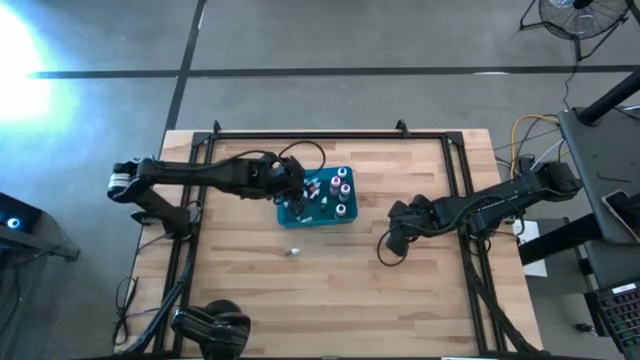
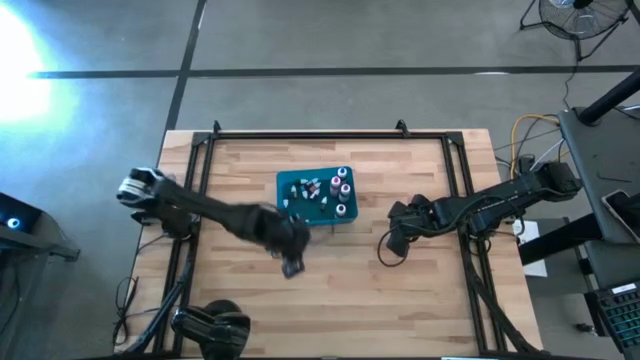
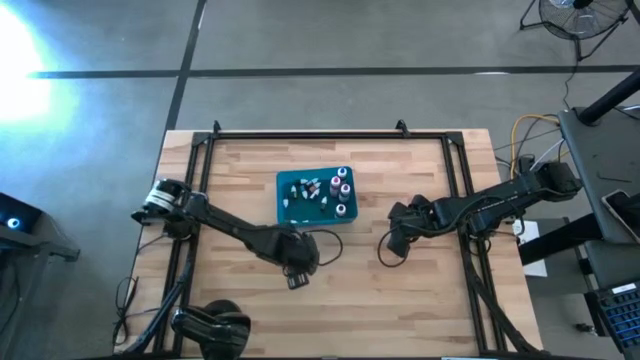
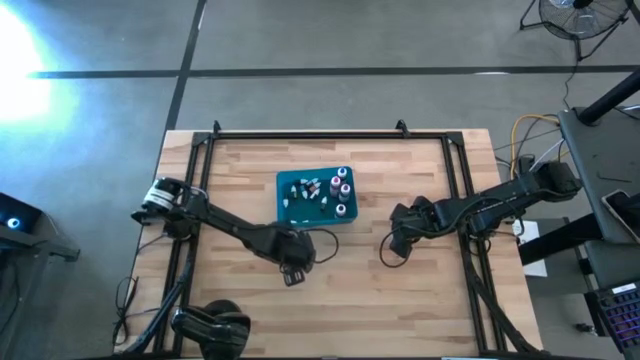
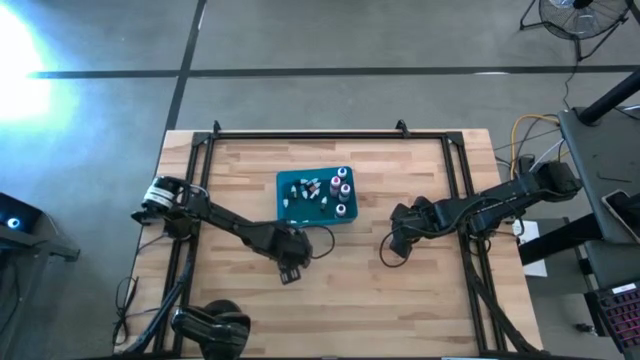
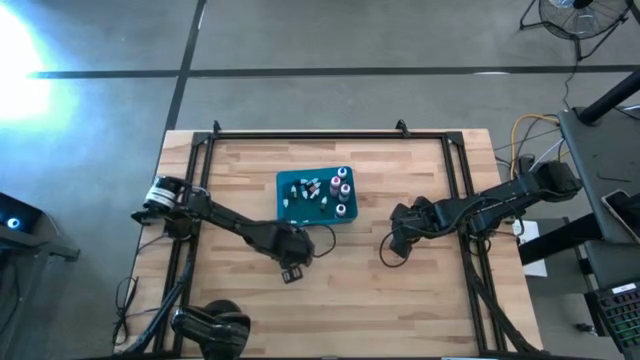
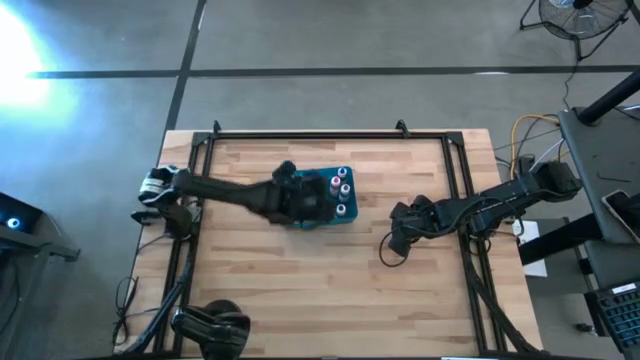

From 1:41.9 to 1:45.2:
Task: Pick & Place food coloring
Put the small dark brown food coloring bottle into the blue bin

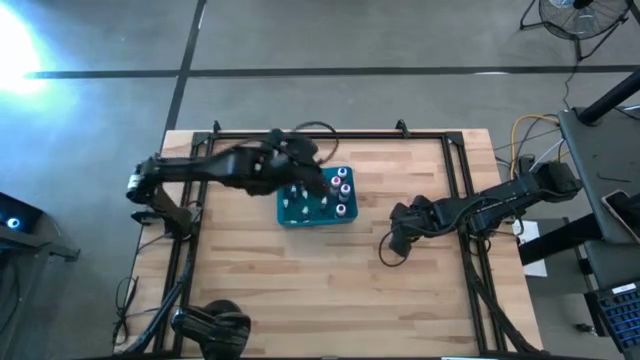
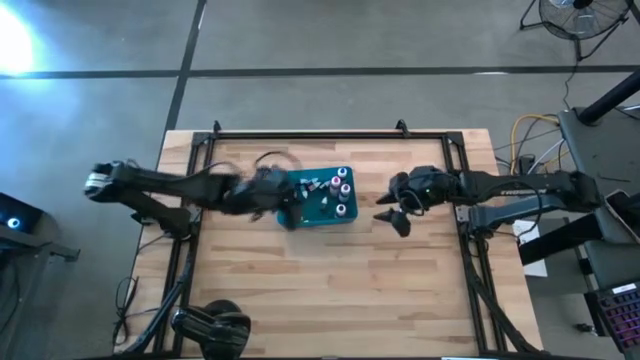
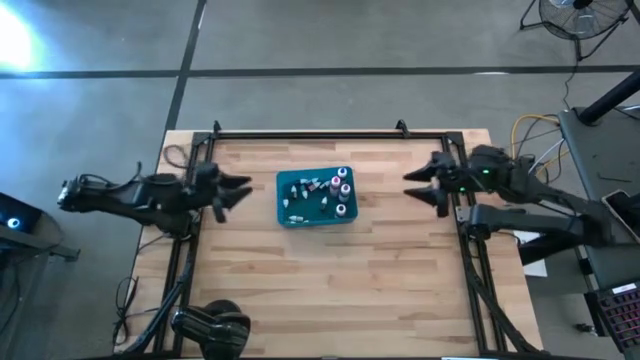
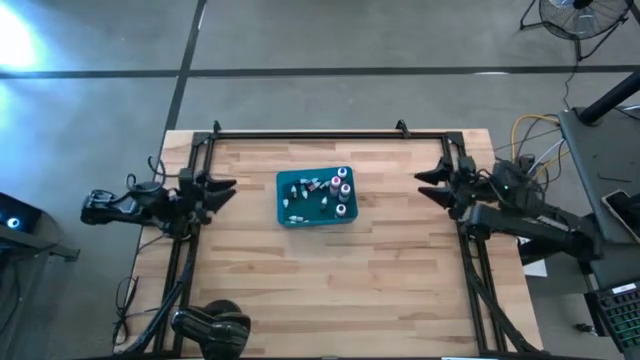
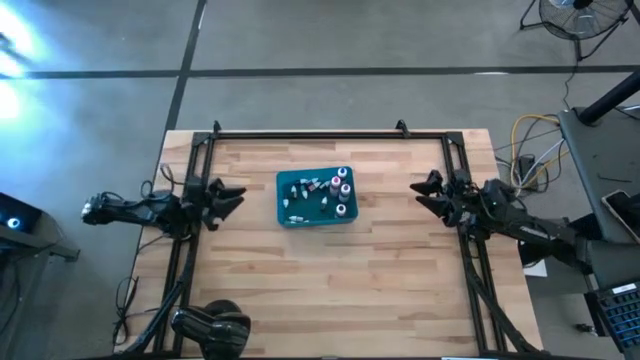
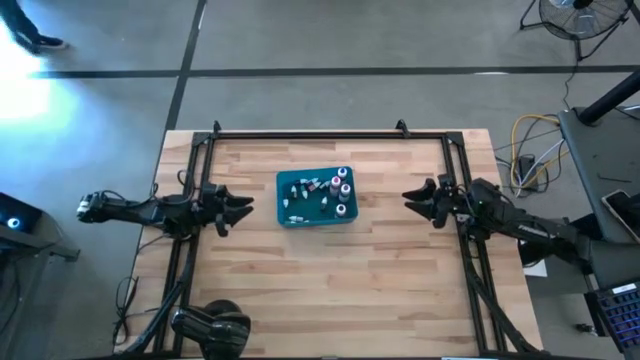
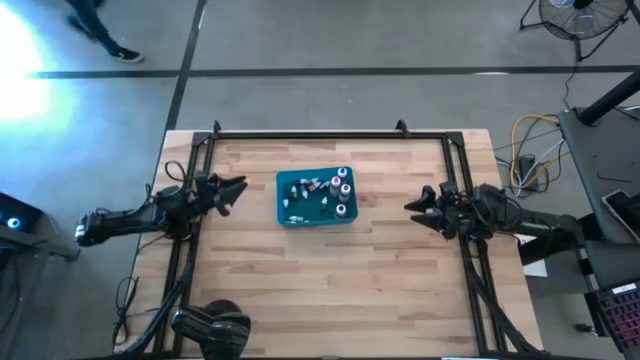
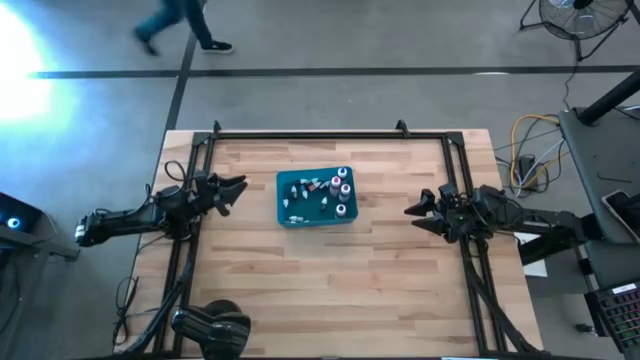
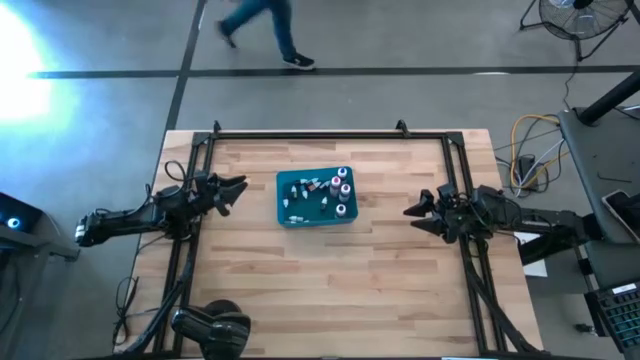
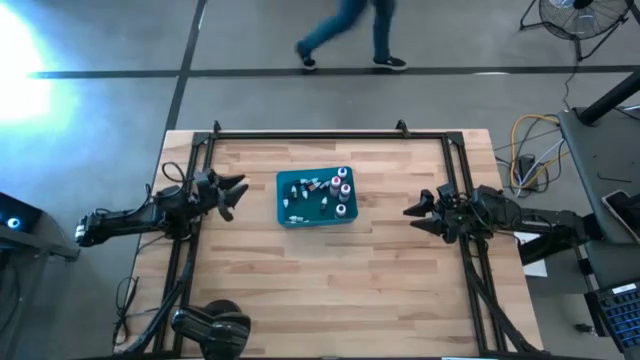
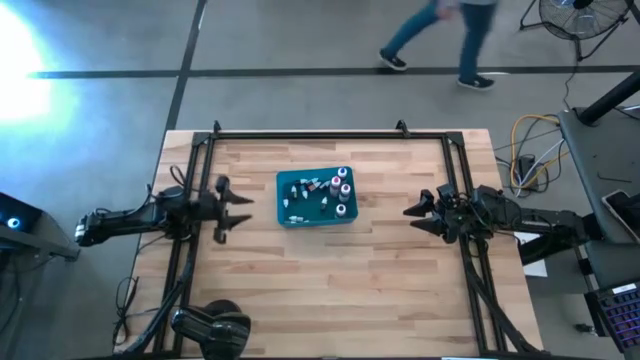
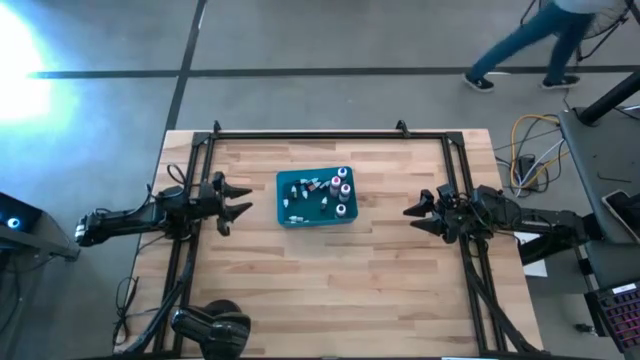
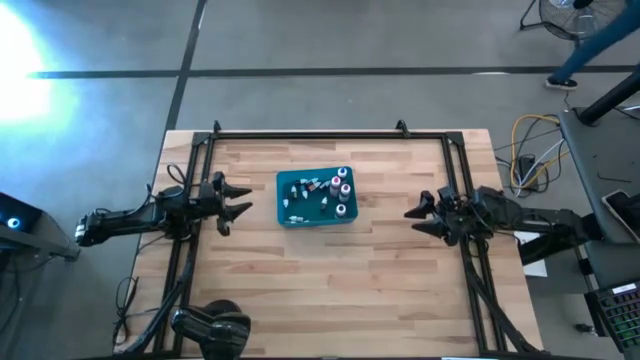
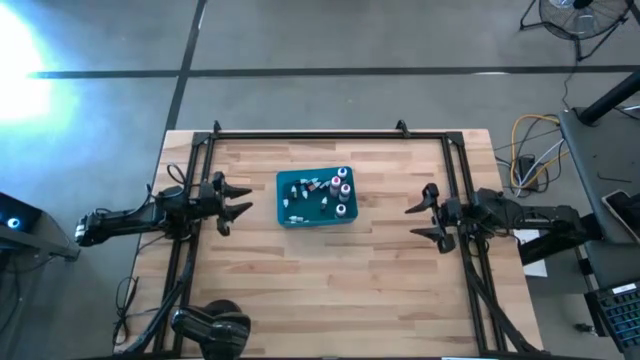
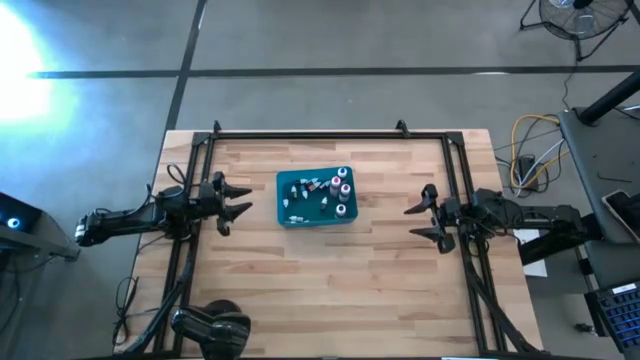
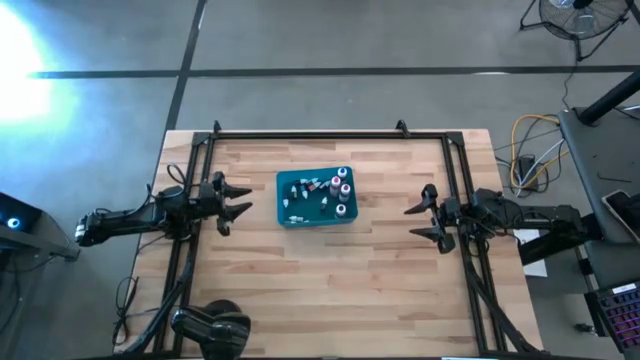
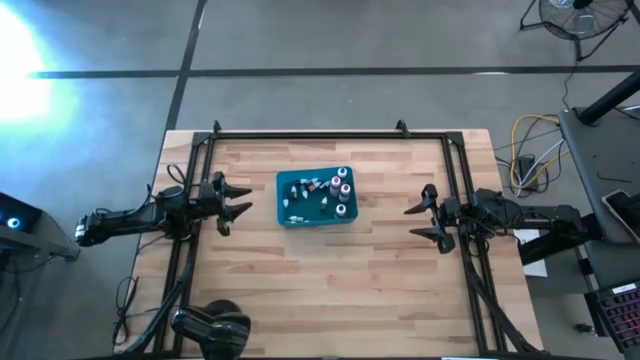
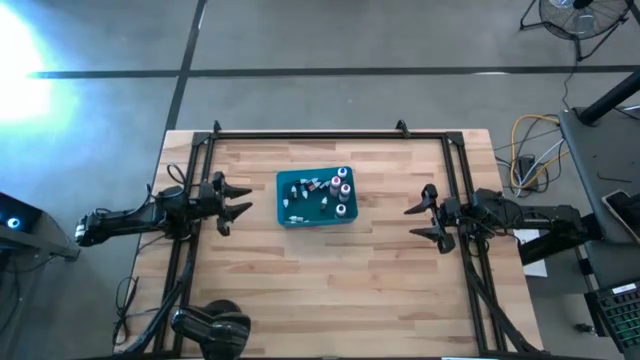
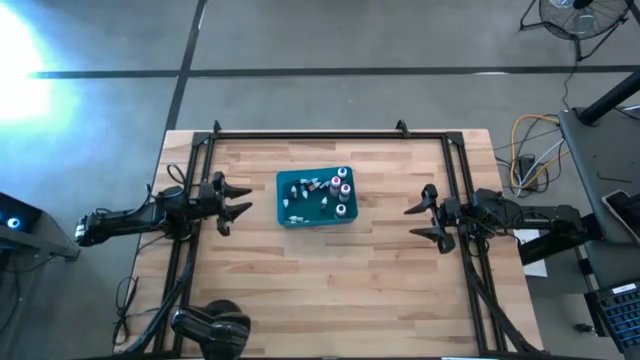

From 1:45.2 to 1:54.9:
Return to Home Position

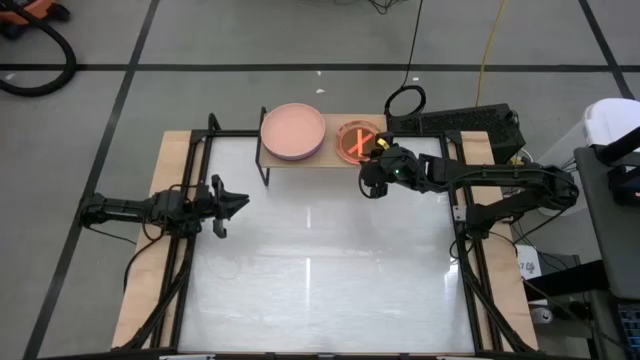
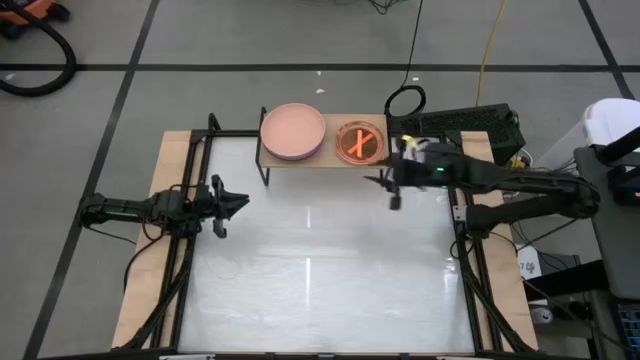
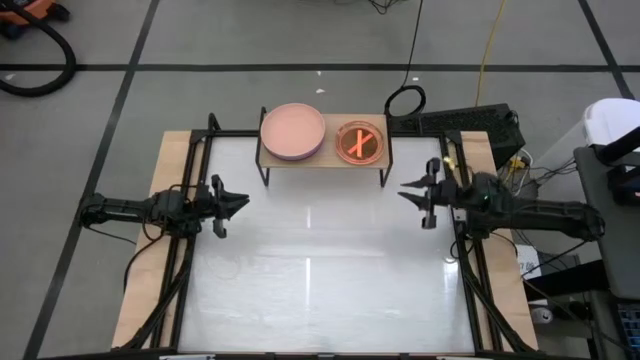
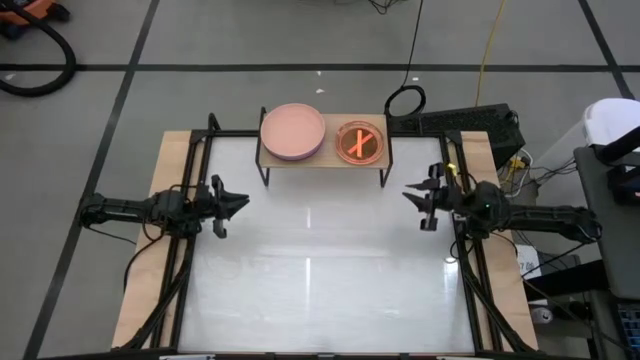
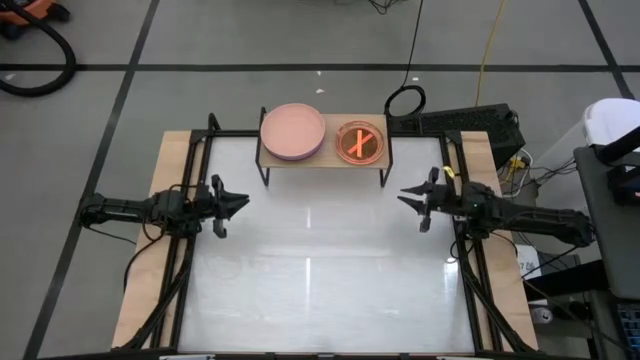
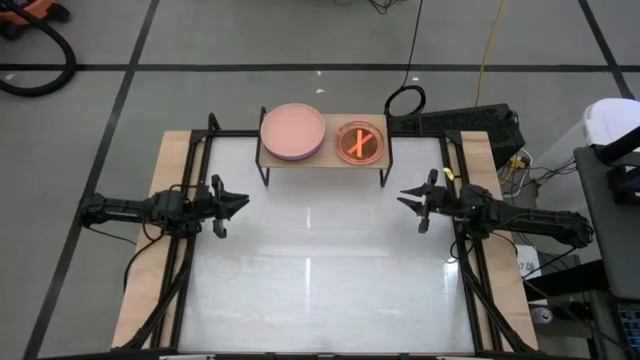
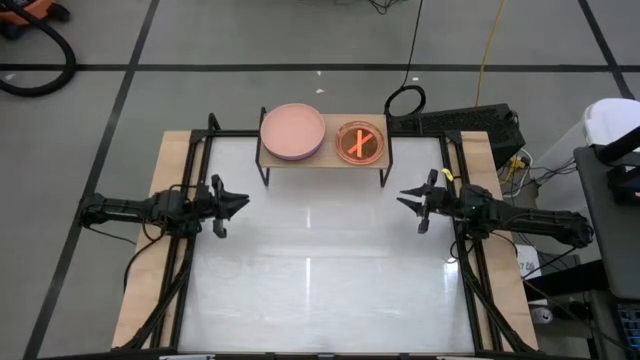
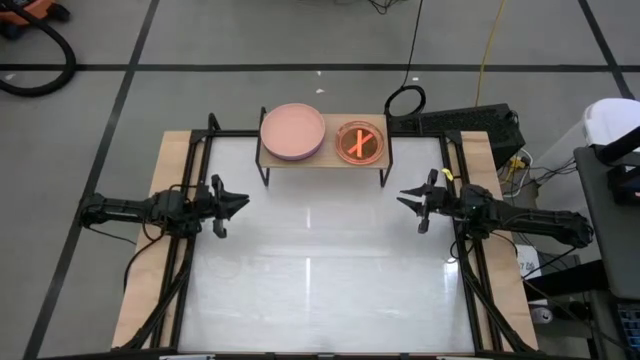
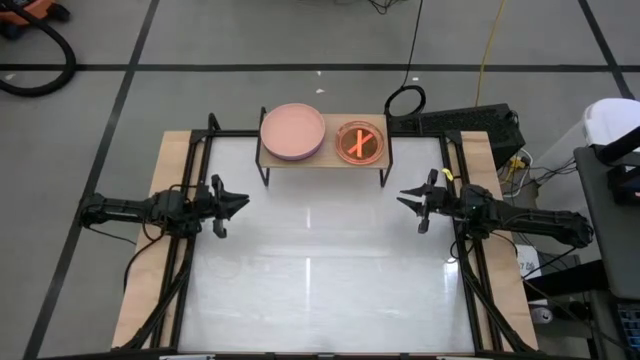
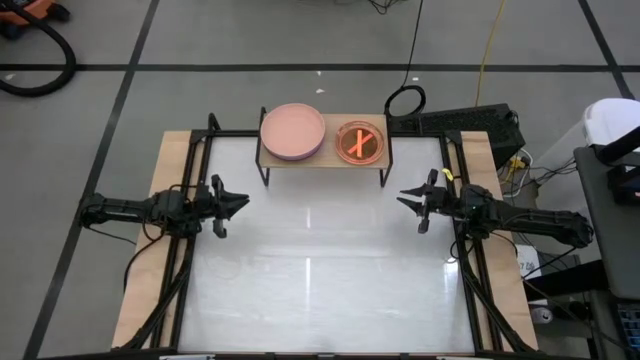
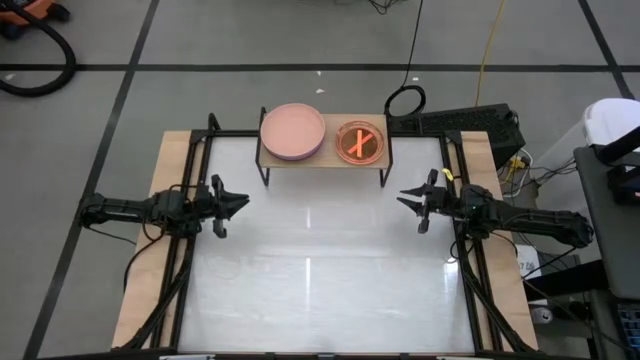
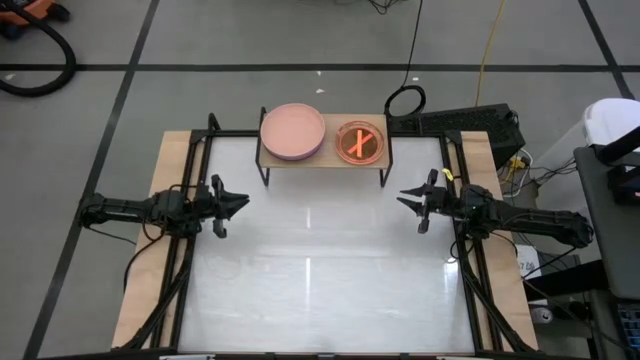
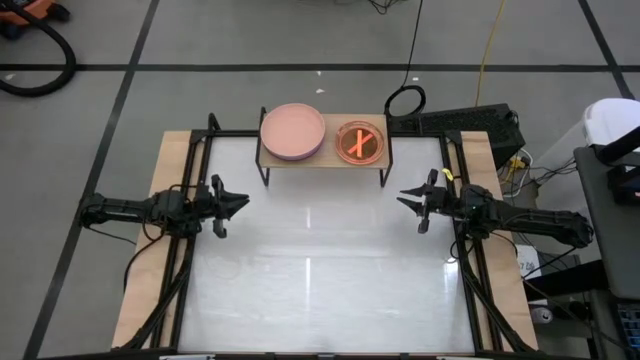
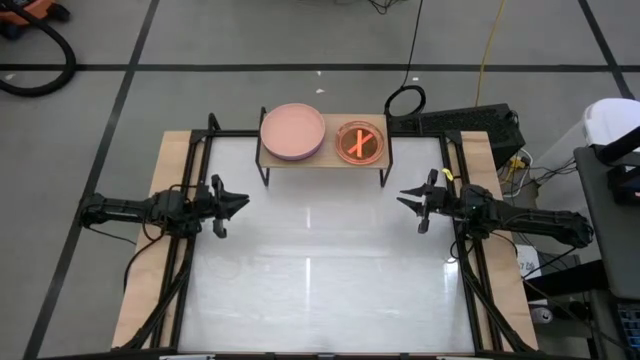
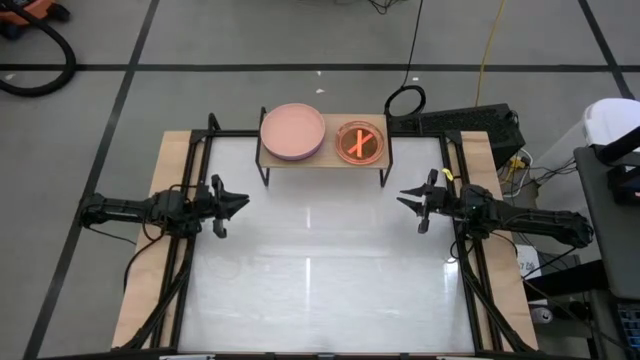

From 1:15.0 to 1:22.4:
Task: Place and stack plates onto a shelf
Return to Home Position
